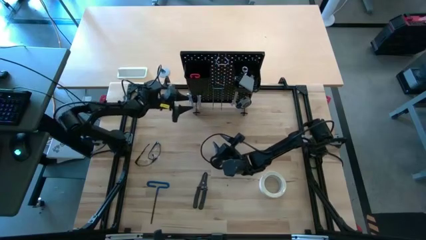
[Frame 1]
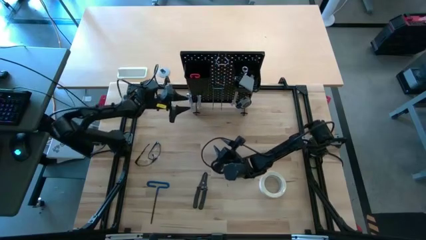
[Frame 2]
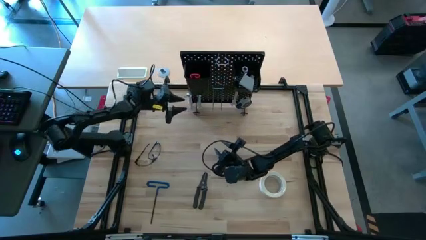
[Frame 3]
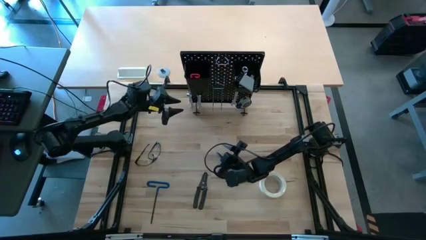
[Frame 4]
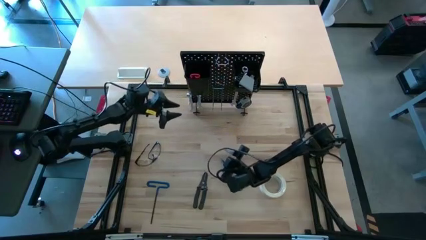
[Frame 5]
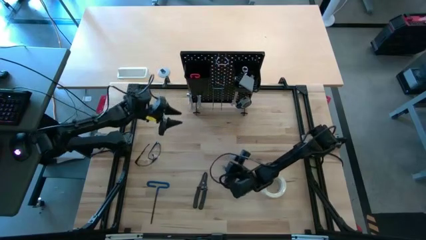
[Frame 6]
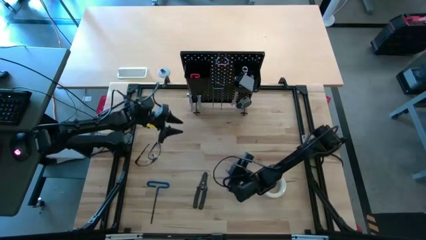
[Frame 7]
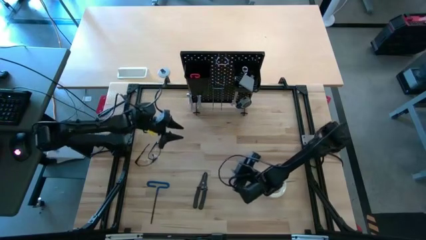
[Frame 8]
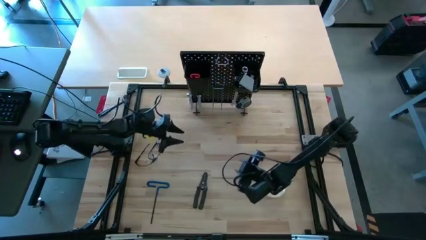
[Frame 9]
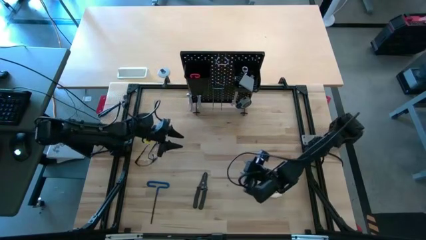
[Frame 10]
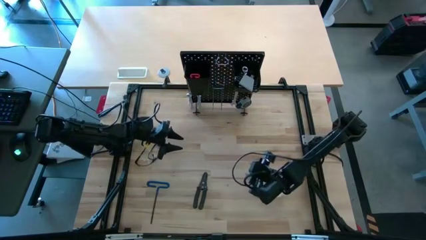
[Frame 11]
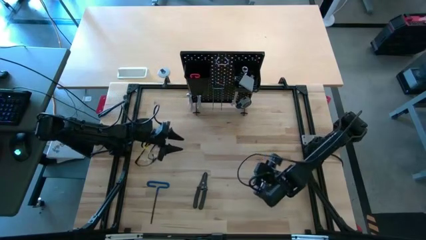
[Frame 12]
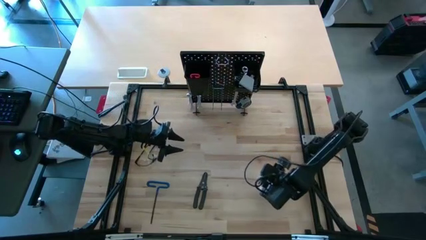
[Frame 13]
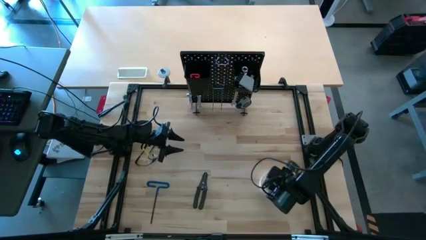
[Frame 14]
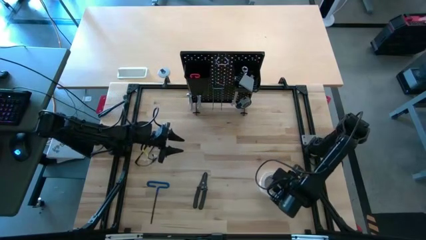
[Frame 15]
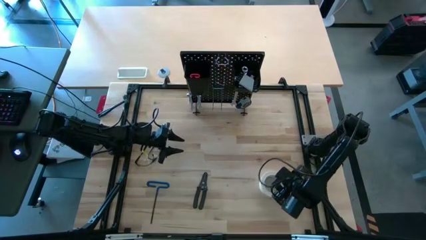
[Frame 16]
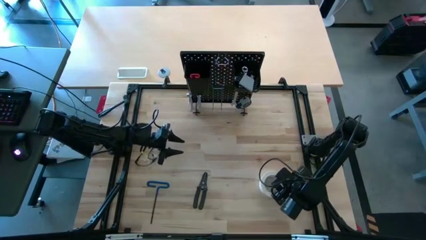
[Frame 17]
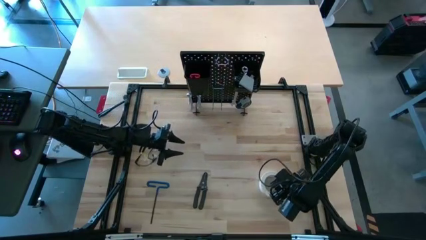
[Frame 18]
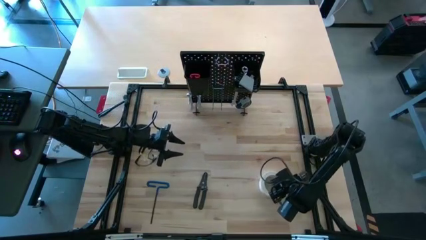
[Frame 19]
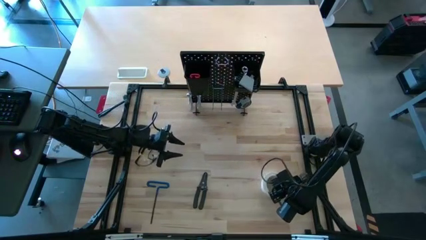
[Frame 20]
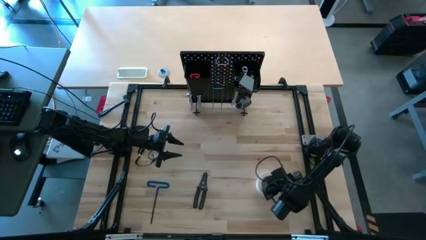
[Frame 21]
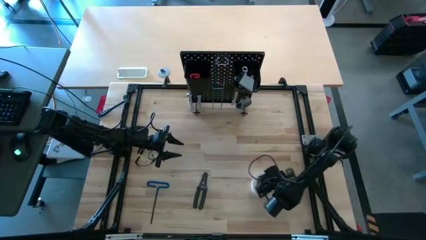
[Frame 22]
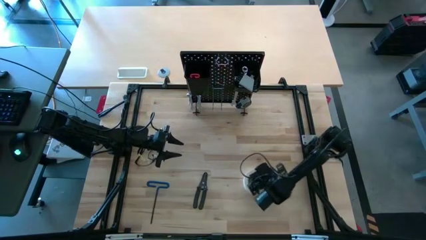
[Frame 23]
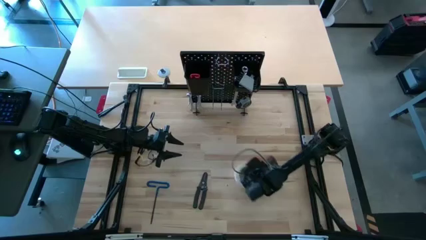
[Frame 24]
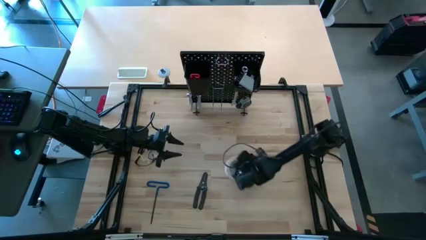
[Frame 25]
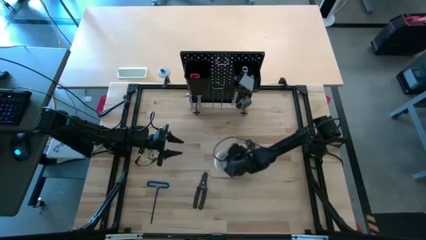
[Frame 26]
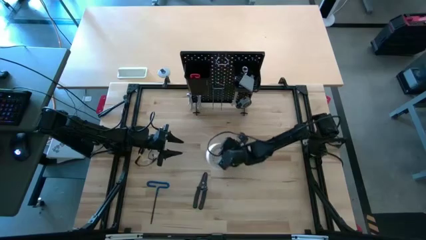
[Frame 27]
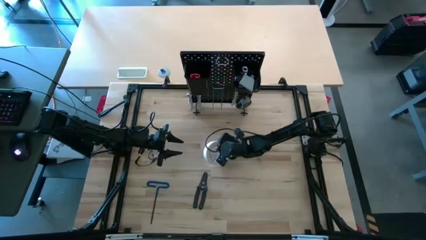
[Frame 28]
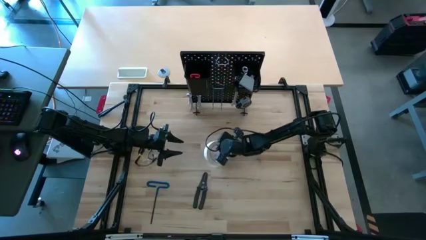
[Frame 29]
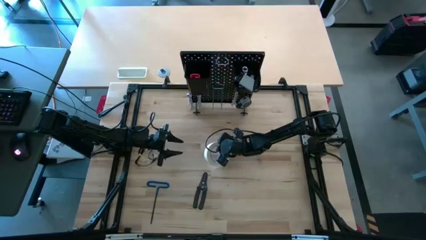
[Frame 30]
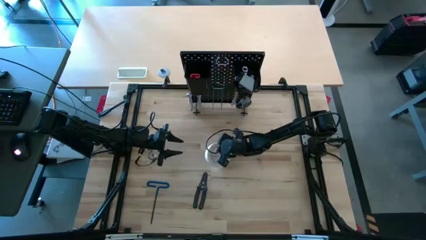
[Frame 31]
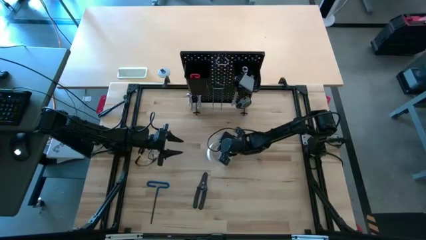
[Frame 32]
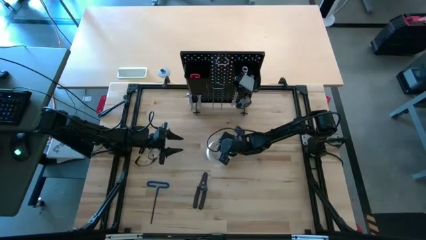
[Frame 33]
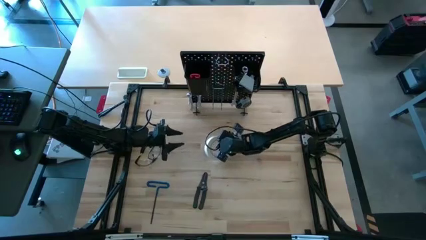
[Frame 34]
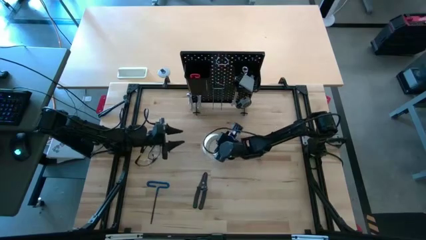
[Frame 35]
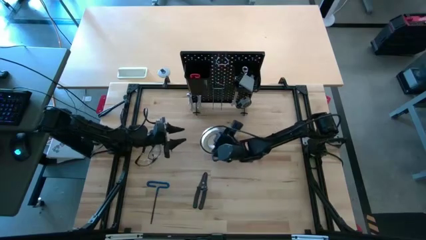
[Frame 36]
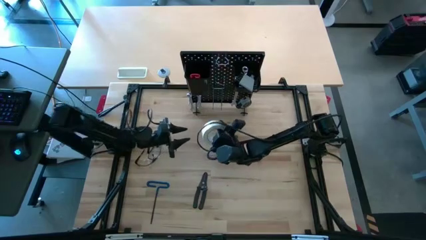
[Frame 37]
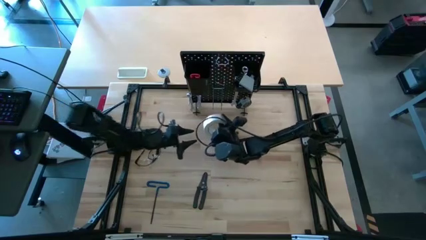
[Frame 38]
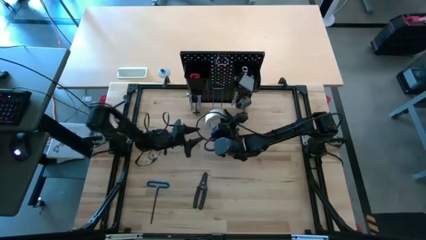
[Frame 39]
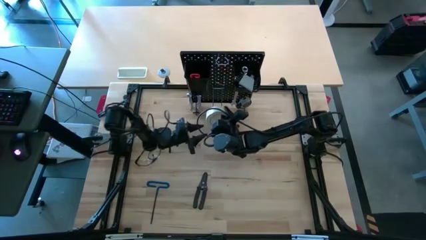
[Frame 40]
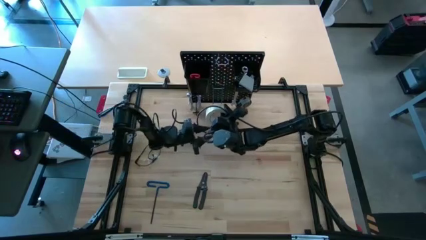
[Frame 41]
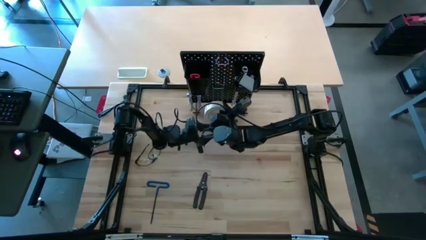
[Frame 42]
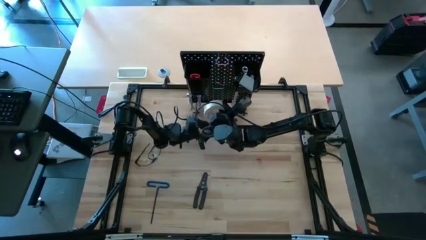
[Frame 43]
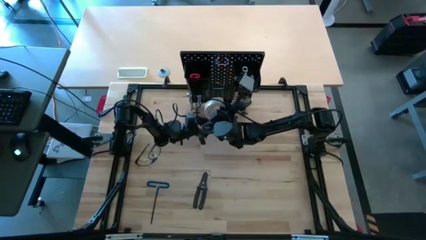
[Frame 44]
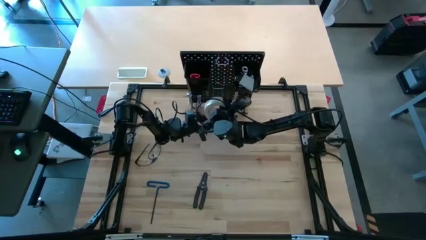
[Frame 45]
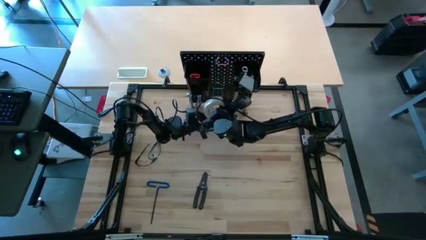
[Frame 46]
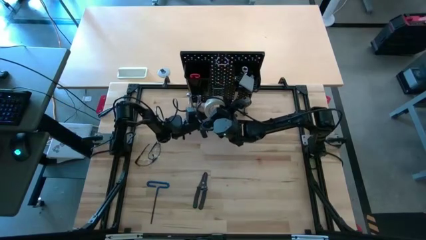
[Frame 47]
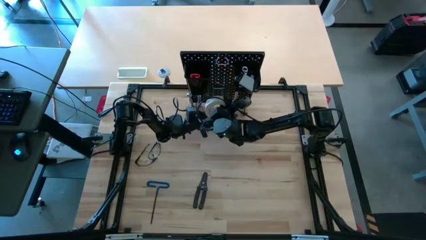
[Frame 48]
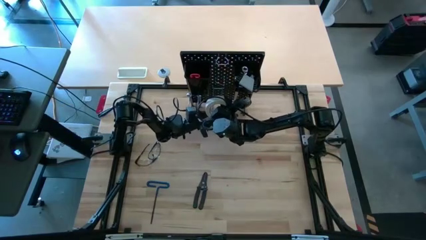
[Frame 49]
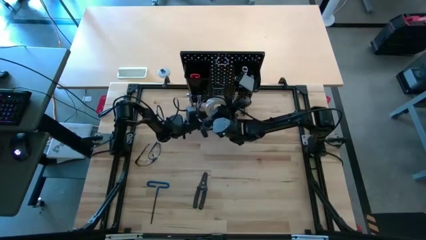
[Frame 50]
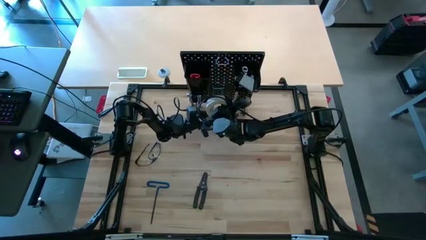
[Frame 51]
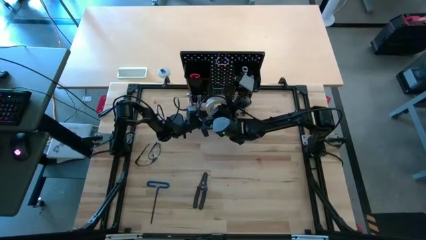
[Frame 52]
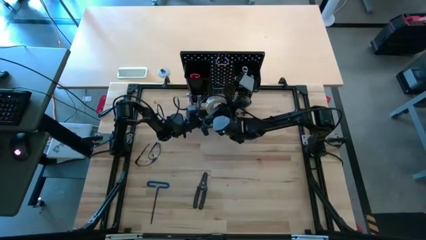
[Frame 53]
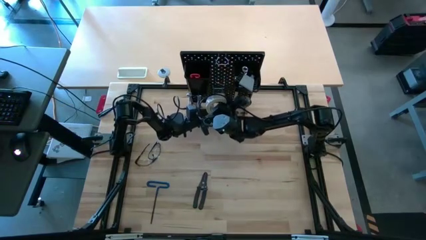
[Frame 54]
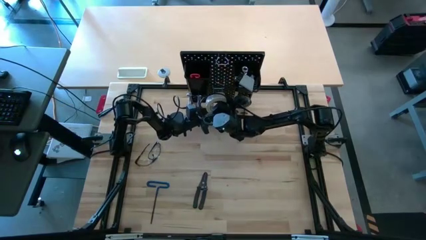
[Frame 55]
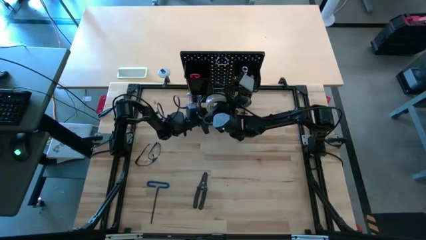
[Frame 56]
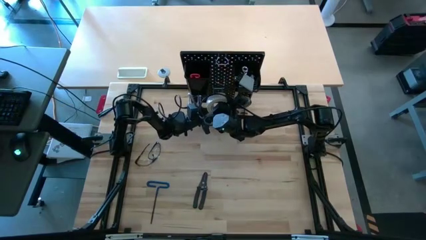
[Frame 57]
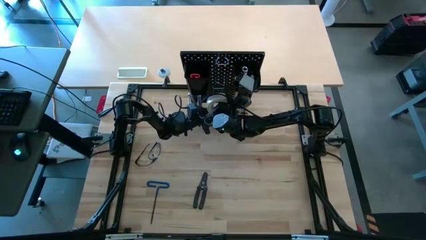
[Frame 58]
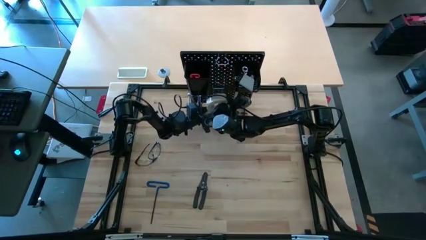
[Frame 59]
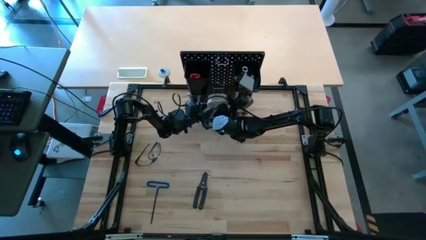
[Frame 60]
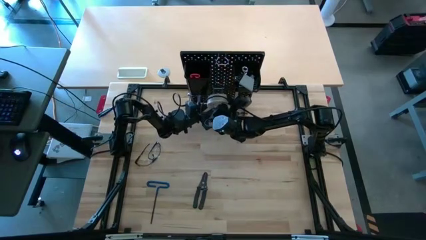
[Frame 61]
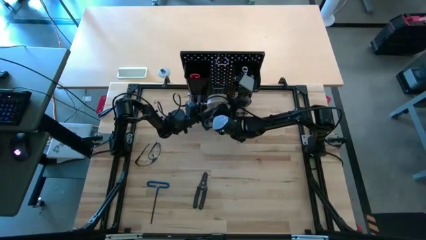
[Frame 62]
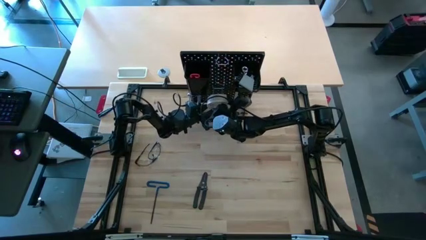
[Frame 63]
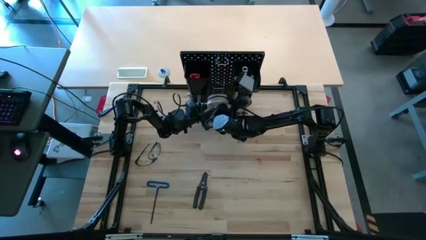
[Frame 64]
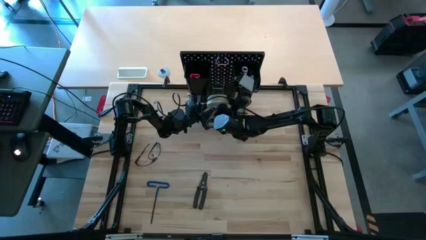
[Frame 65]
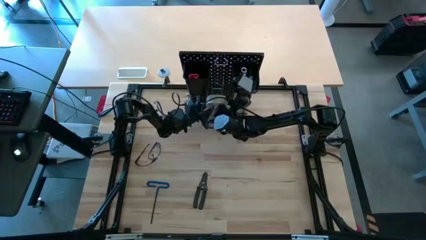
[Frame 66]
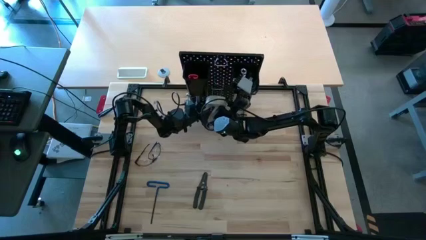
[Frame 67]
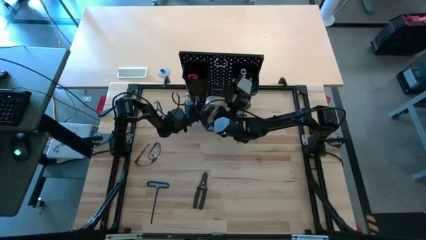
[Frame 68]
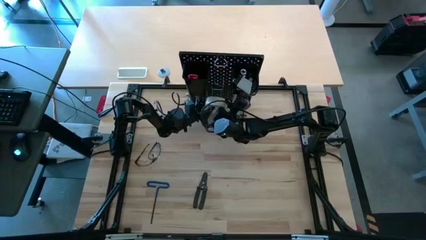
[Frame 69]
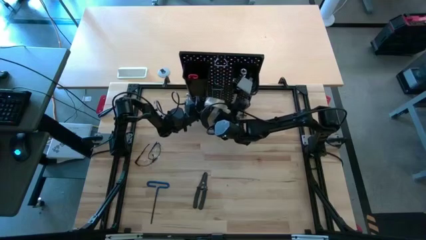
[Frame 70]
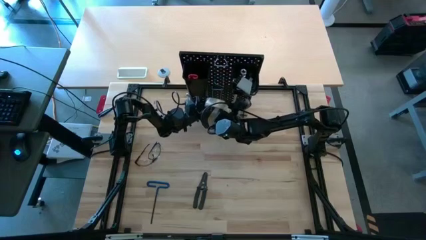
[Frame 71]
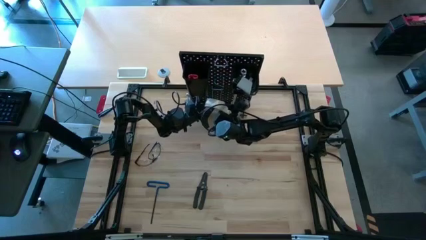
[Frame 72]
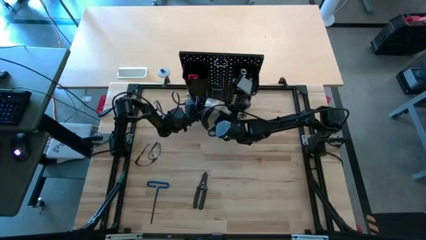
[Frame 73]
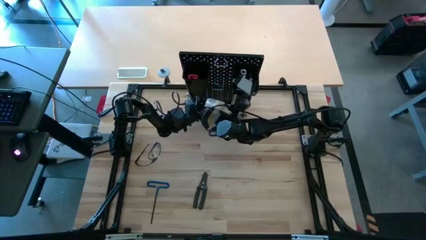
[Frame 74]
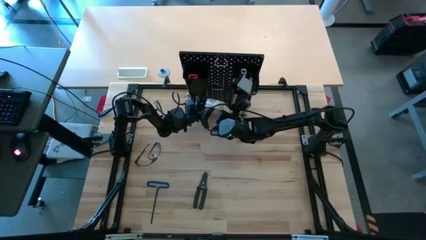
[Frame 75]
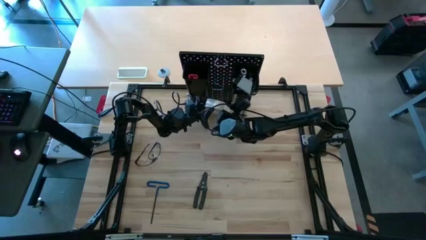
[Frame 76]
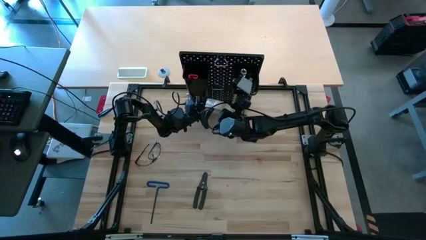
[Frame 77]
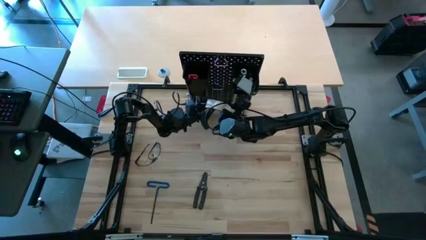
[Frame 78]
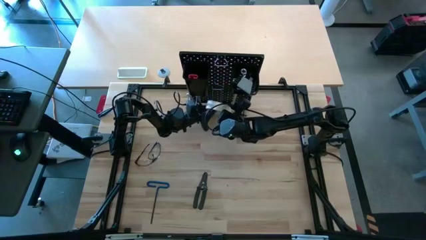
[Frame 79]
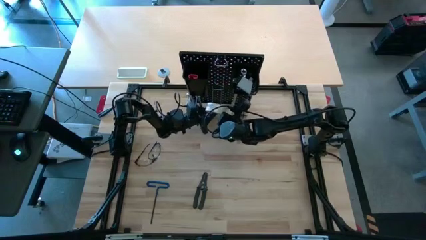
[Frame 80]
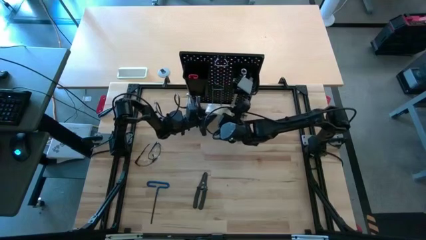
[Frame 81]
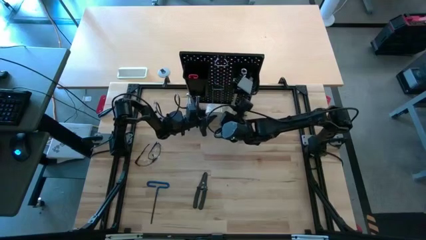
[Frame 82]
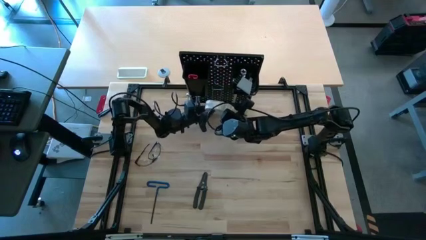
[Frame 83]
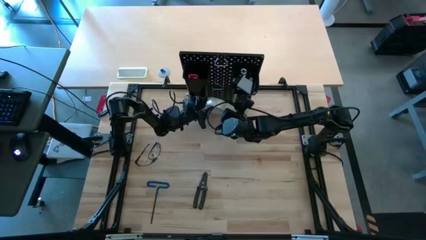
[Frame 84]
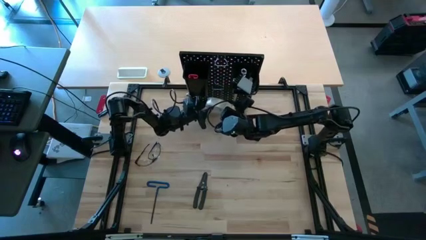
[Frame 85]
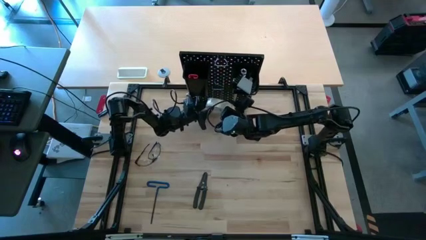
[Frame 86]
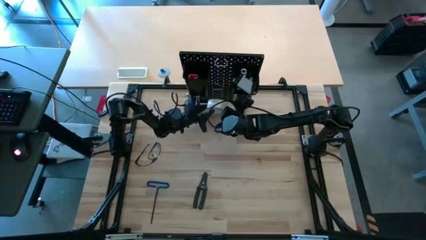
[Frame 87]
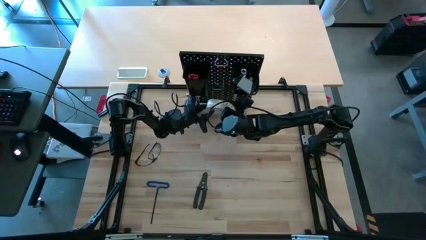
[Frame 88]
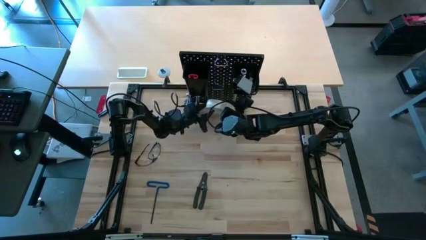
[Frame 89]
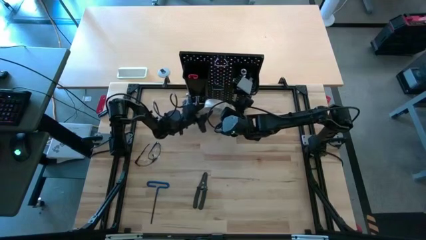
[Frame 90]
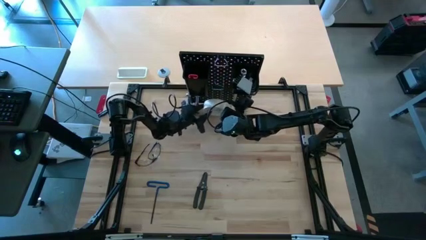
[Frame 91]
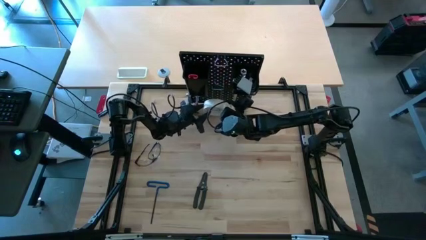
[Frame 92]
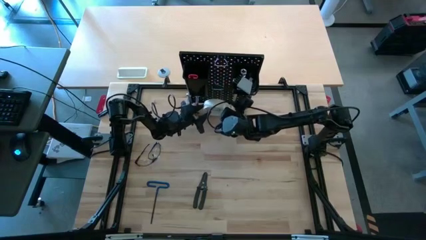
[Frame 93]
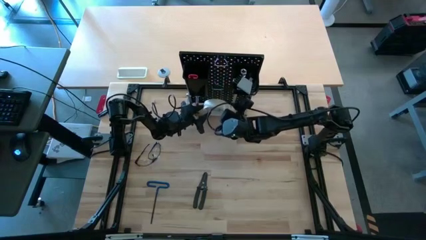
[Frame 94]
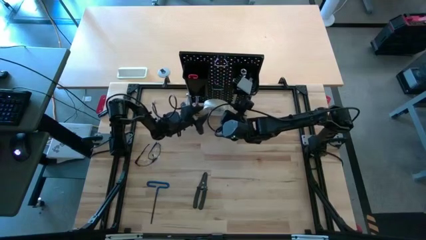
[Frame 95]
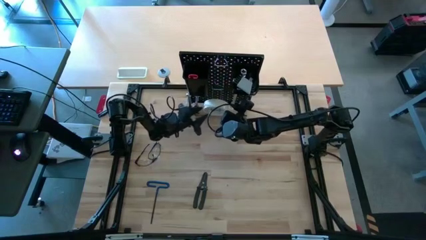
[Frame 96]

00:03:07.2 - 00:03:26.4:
Task: Hang tools onto peg board
Hang the white tape on the pegboard
